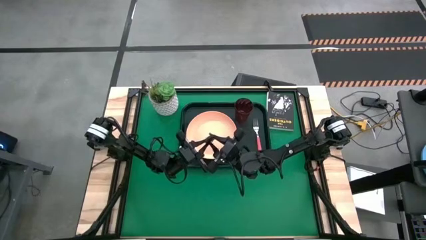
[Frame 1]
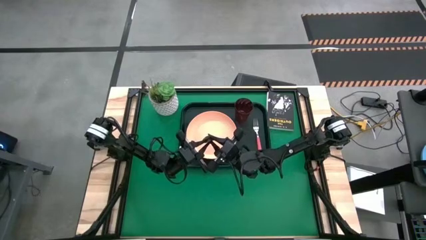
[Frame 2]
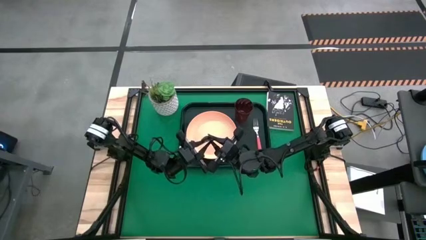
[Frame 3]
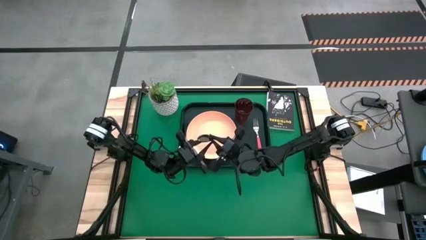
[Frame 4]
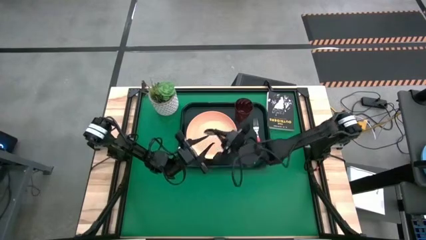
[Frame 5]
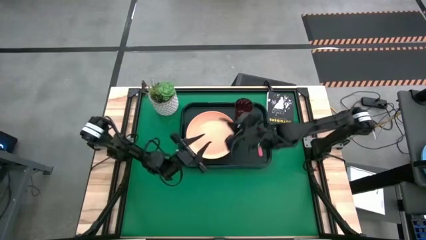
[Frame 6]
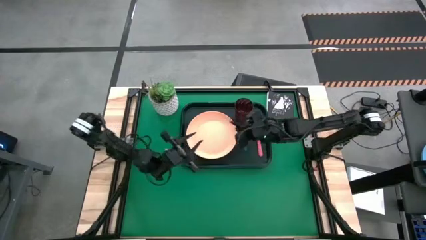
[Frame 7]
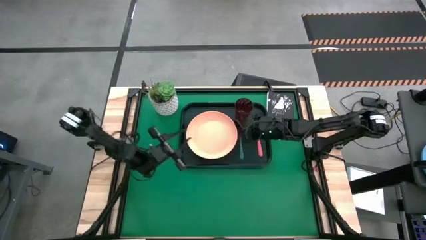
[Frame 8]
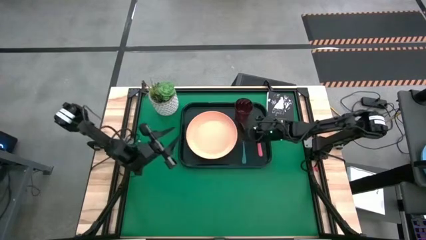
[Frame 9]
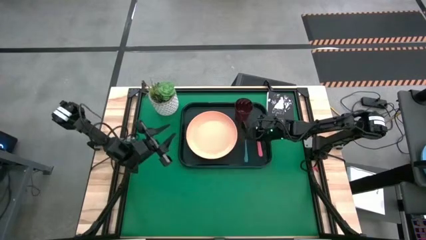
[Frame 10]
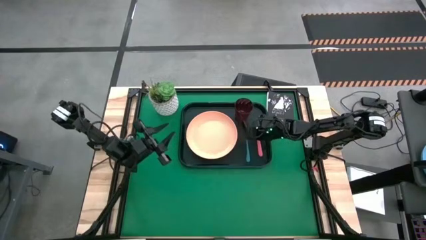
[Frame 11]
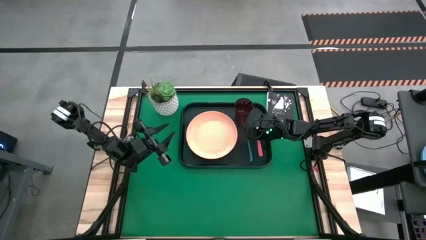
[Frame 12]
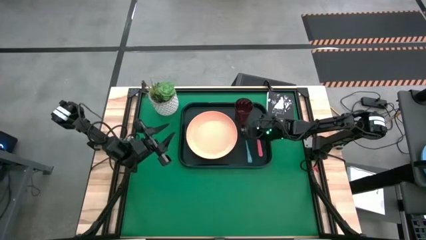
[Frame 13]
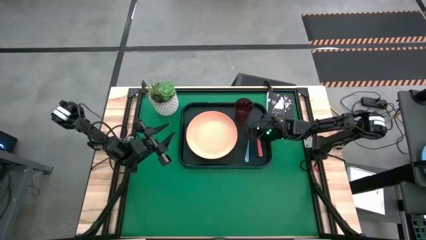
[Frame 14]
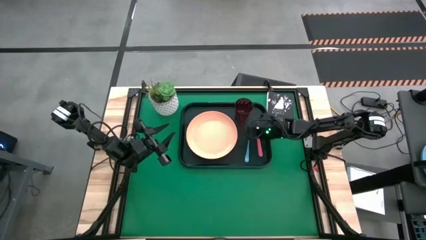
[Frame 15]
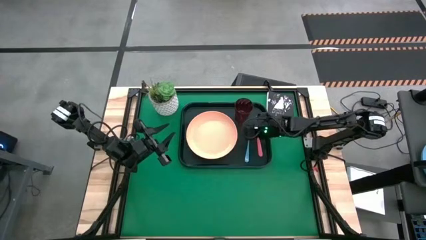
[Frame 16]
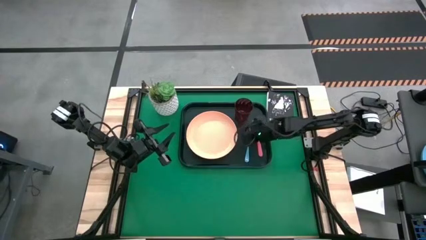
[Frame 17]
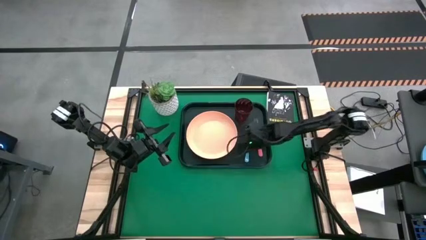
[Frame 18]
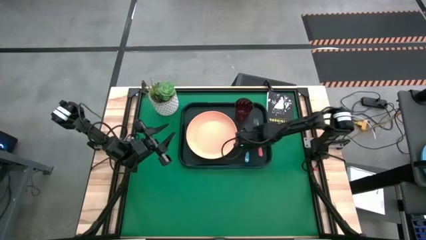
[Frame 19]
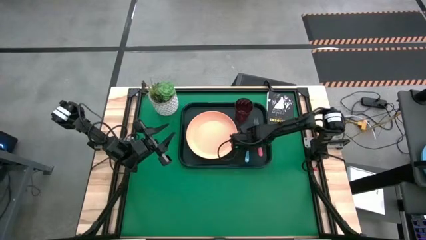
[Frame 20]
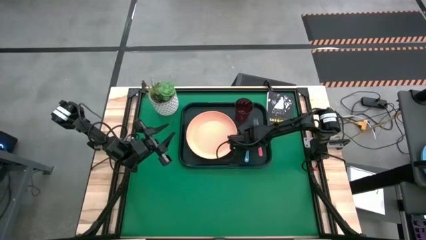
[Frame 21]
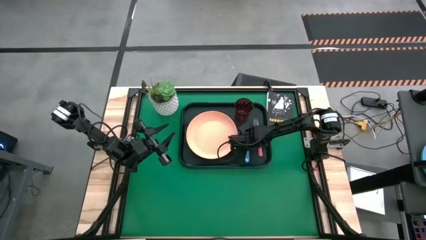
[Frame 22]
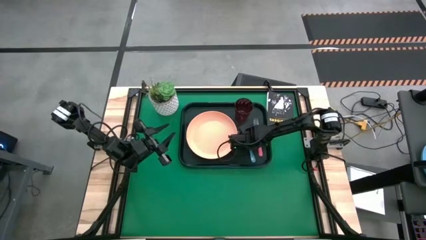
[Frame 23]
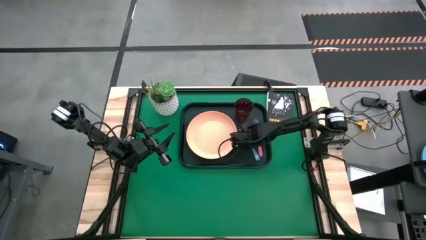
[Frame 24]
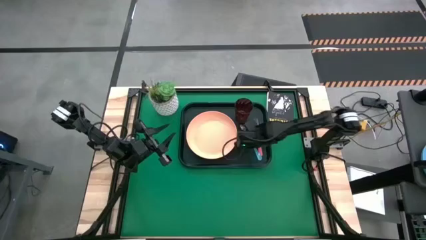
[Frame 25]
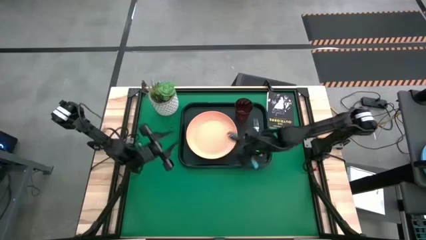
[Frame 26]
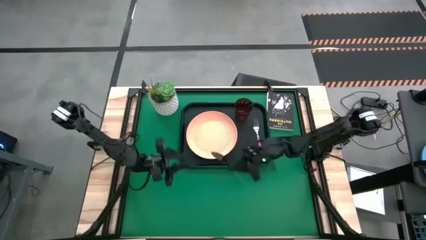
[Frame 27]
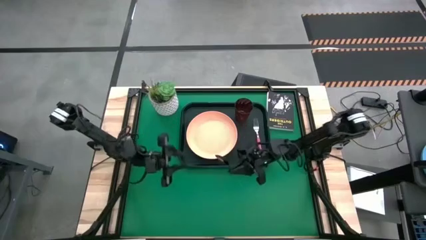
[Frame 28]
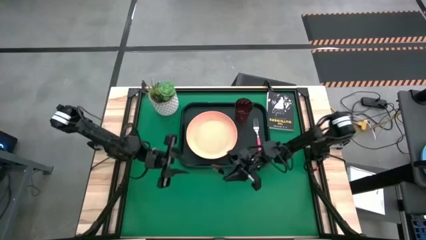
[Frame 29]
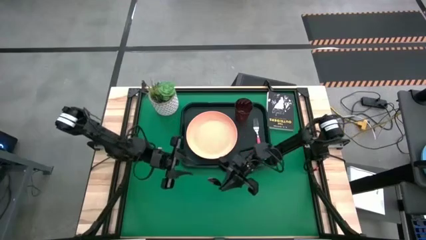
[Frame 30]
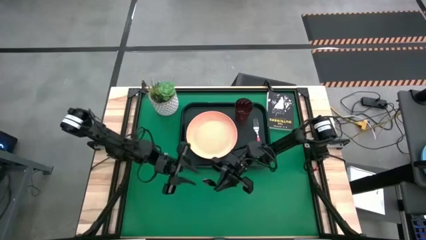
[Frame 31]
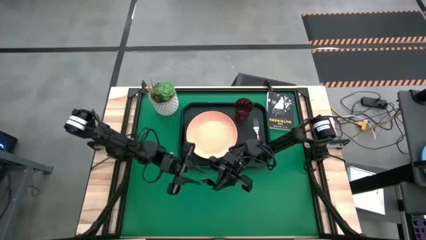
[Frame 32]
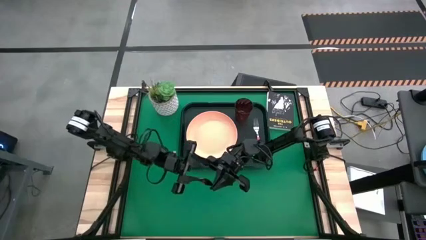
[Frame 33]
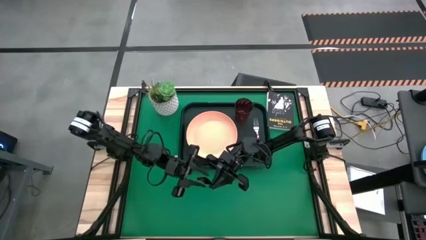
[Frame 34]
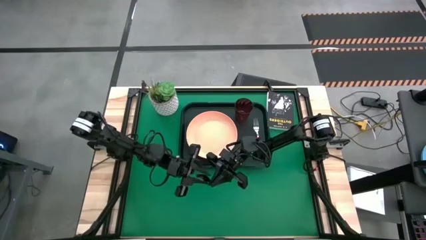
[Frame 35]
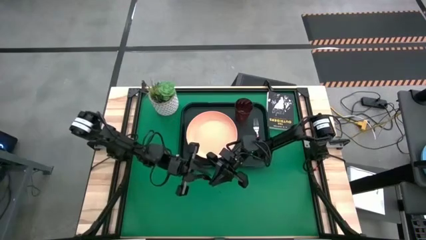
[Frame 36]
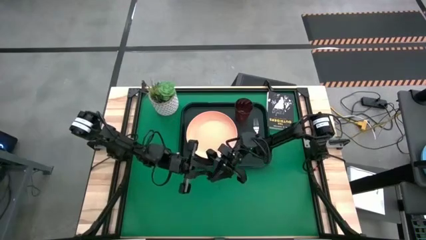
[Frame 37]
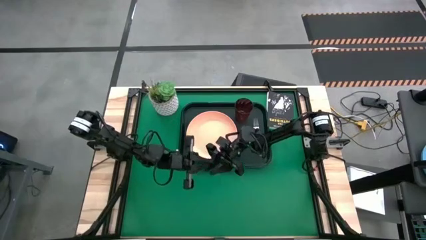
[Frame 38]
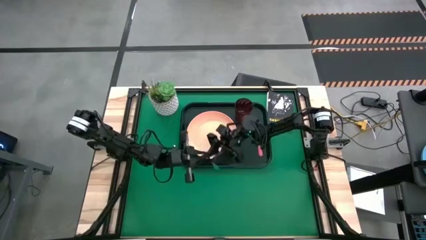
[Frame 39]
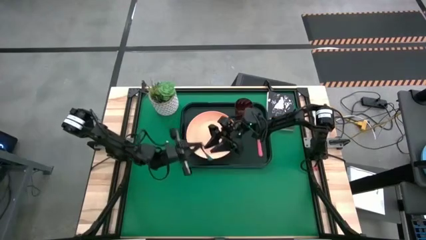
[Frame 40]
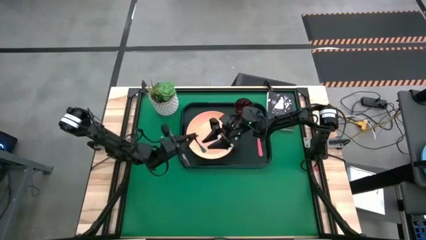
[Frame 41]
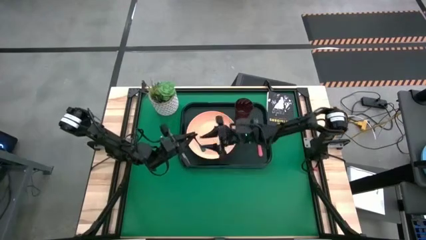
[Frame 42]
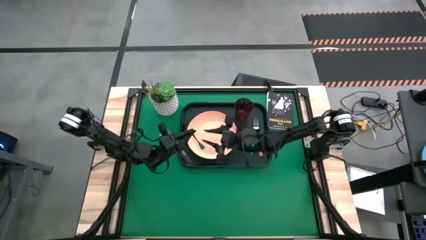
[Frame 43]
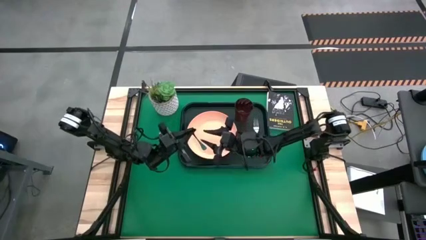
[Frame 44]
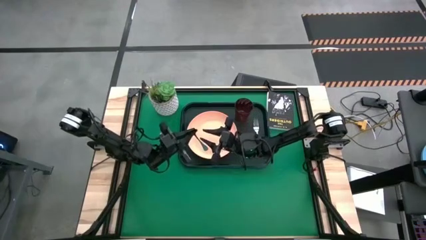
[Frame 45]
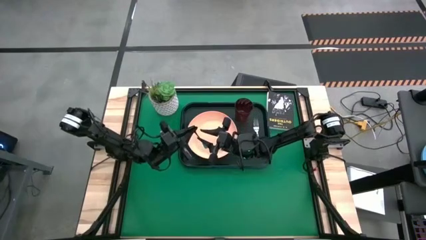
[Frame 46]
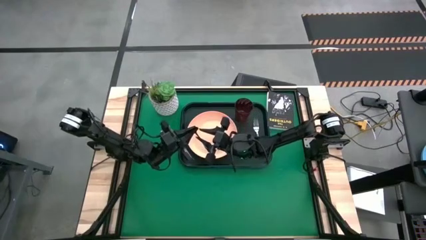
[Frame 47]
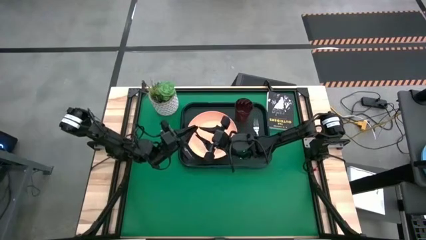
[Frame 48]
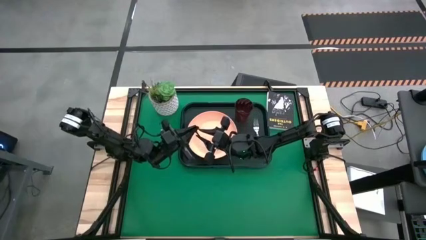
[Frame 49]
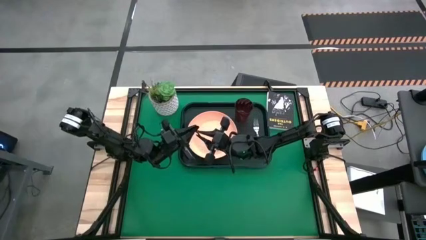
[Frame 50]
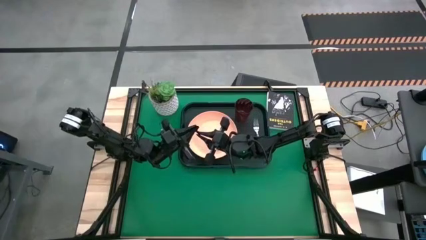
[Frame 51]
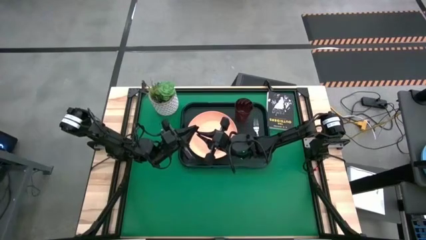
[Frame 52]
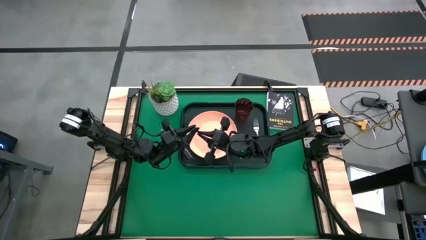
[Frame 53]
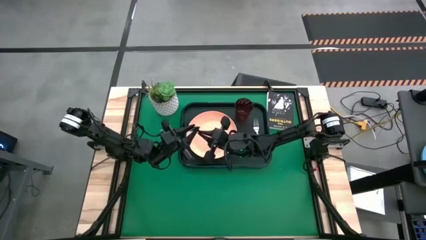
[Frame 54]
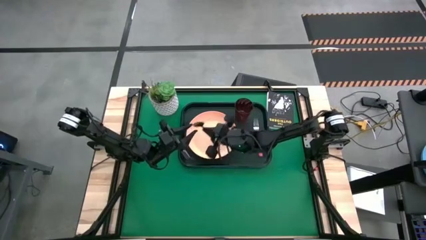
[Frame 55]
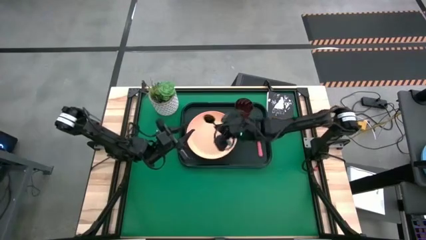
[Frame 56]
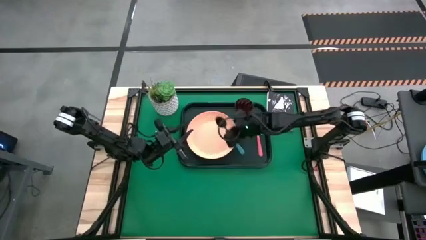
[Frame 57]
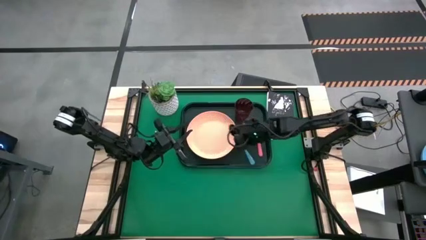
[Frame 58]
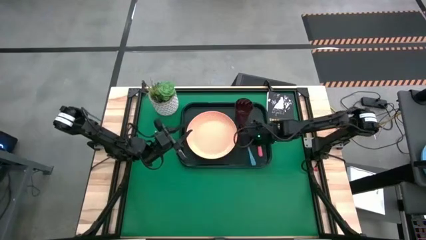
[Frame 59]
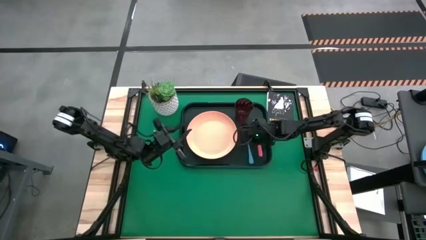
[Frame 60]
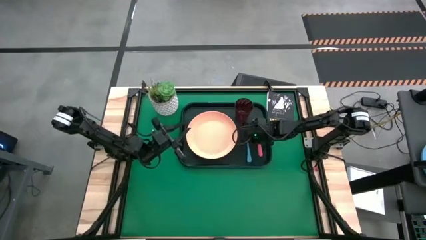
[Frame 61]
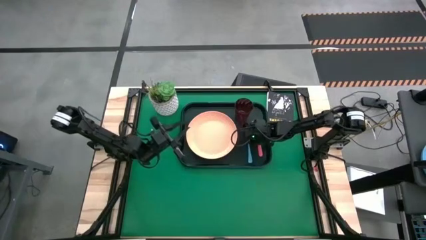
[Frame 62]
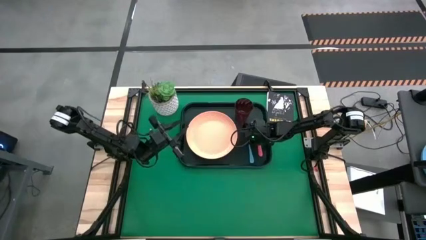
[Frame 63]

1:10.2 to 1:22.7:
Task: Pick and place plate/cup/fork/spoon on tray
Put the blue spoon on the dark green serving tray to the right of the orange plate

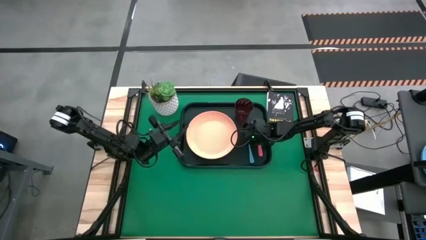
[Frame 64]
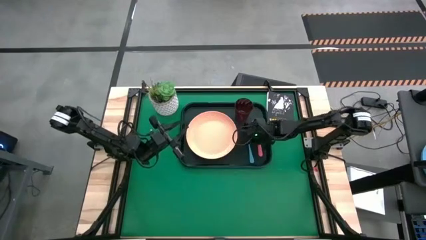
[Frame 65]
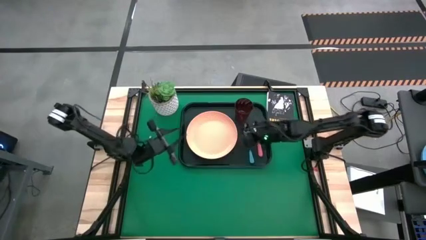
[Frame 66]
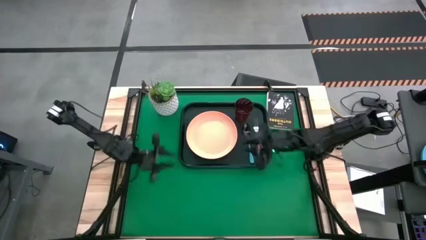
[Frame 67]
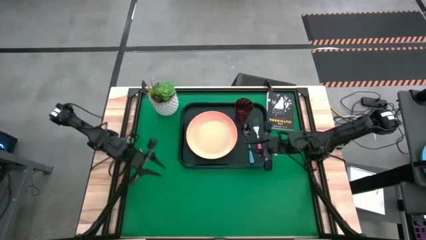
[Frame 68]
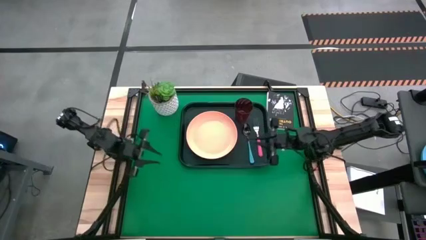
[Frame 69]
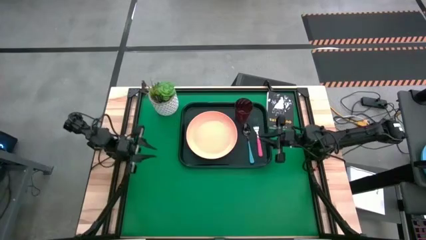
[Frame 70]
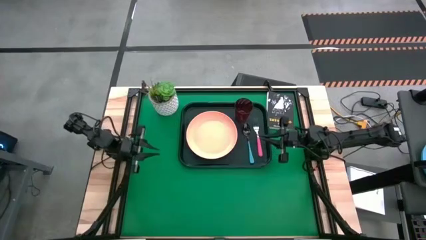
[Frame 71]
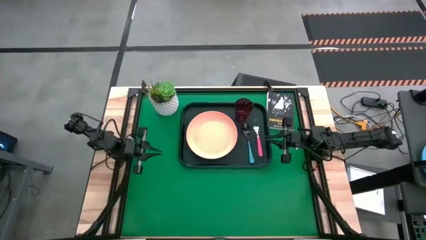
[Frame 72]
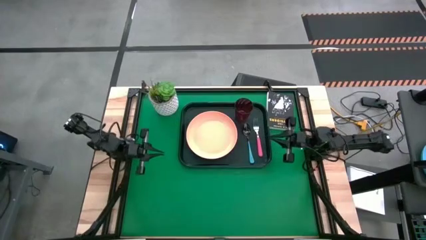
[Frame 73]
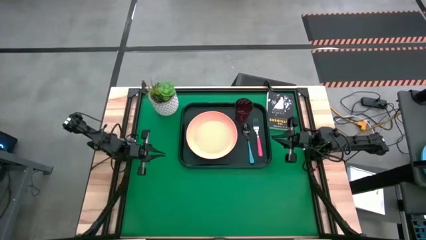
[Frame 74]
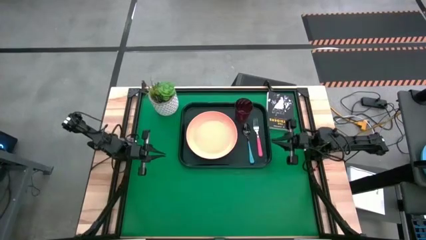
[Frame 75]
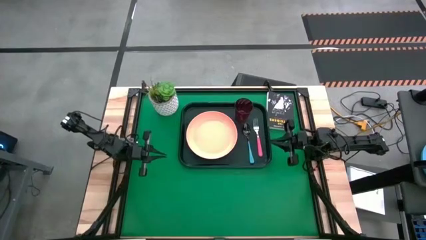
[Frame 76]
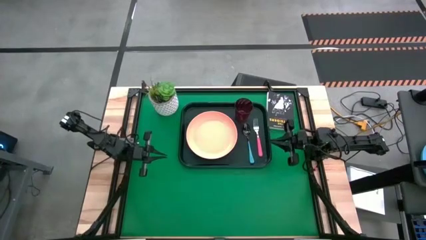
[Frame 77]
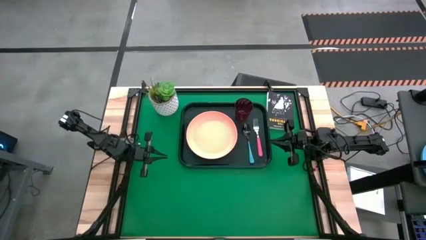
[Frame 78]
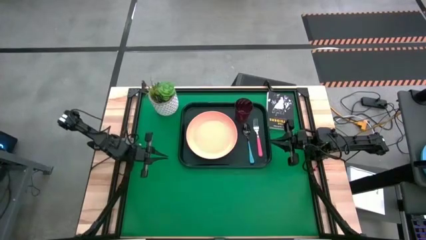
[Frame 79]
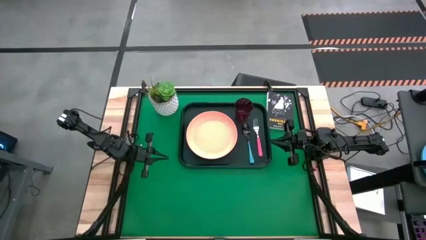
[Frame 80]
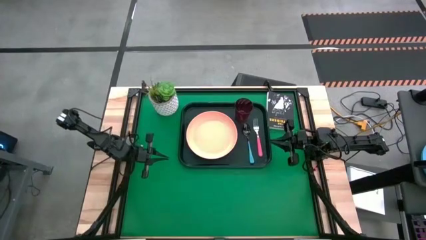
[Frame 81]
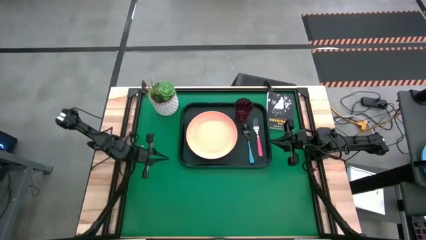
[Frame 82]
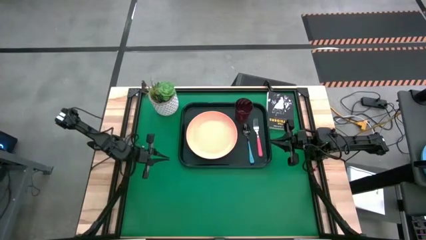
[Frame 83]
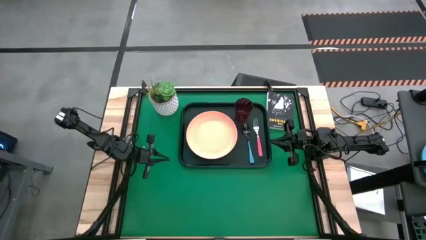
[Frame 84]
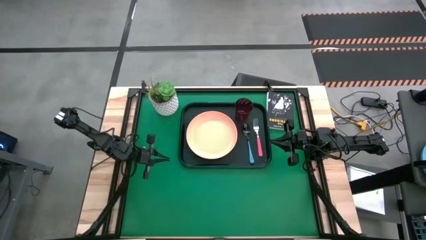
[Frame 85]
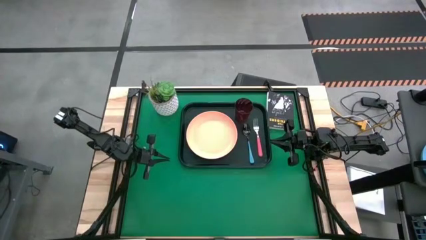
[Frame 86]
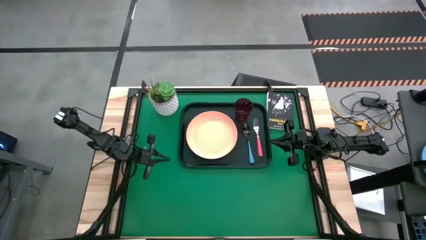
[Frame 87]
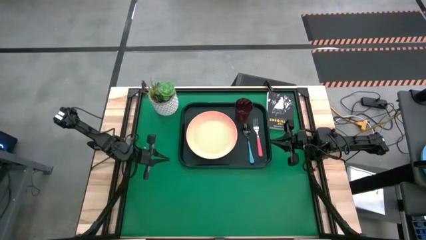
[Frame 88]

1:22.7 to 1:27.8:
Return to Home Position
